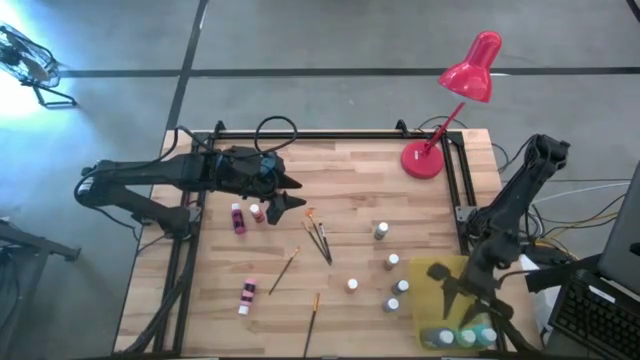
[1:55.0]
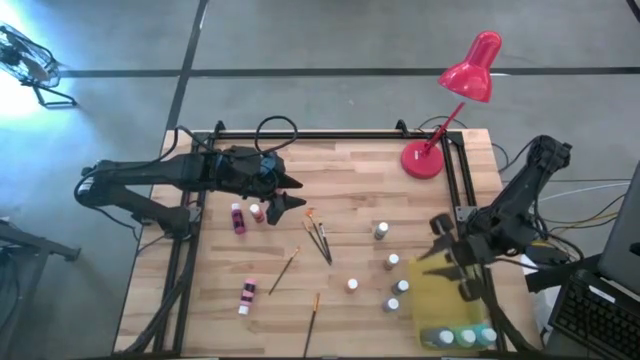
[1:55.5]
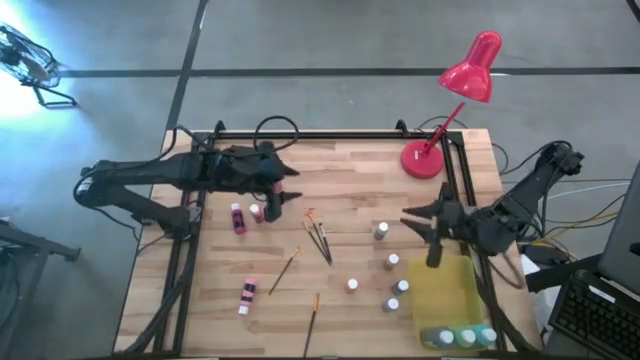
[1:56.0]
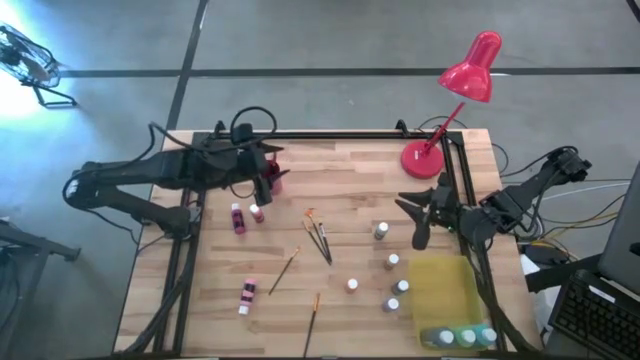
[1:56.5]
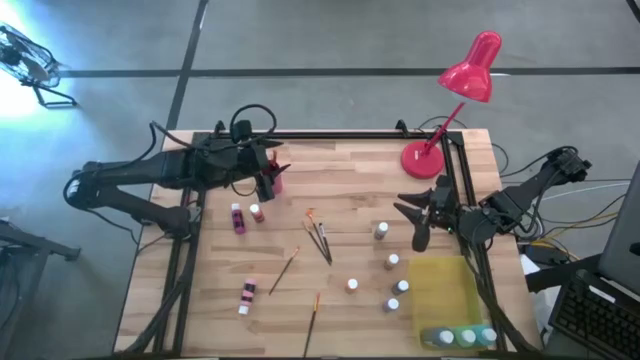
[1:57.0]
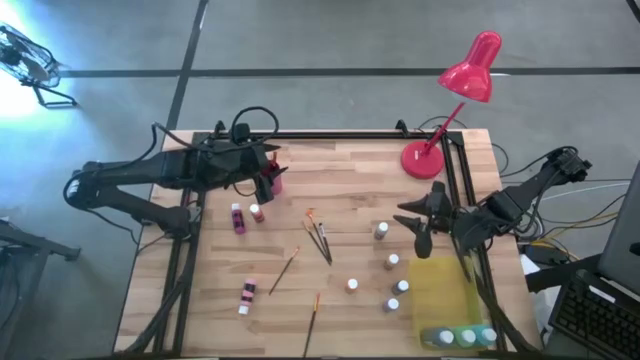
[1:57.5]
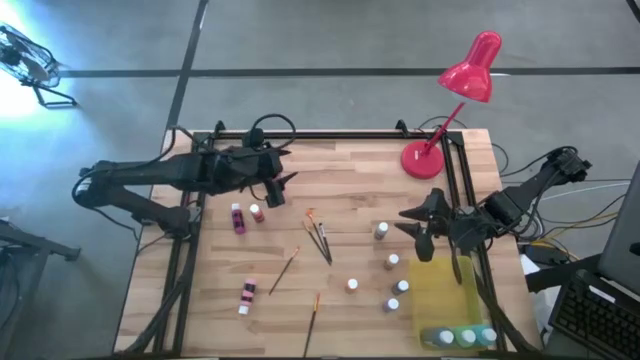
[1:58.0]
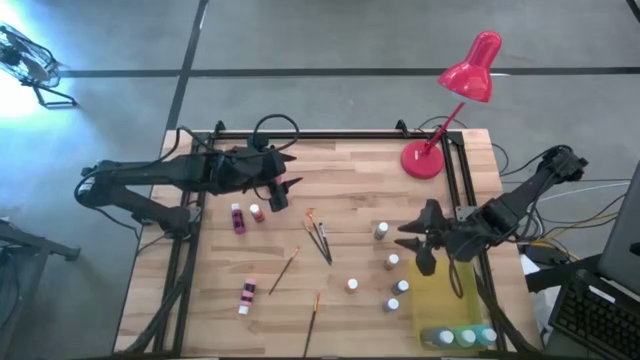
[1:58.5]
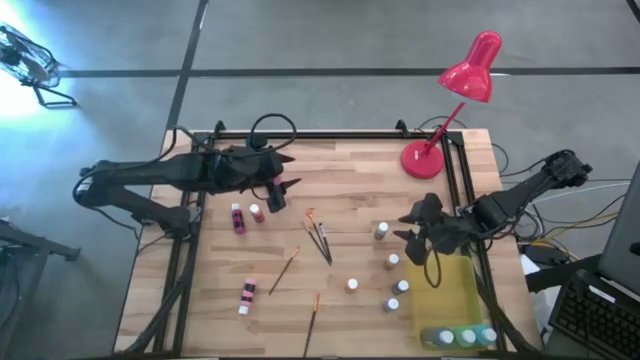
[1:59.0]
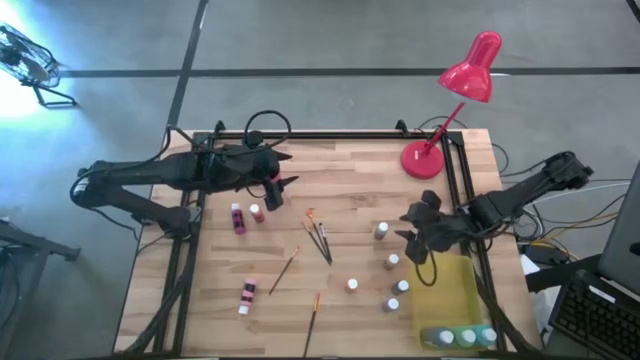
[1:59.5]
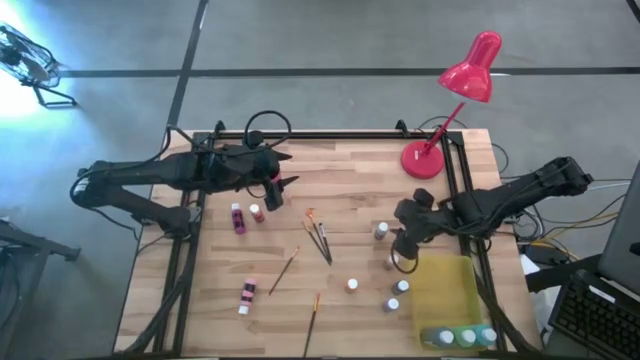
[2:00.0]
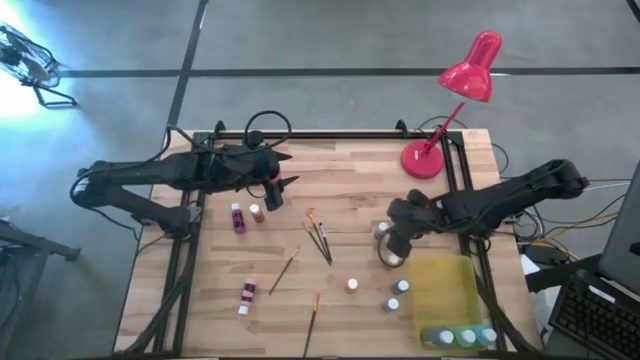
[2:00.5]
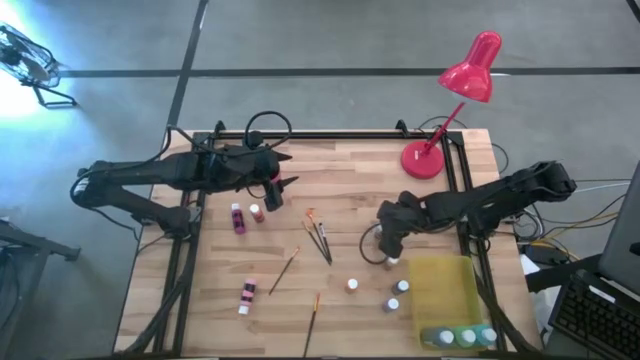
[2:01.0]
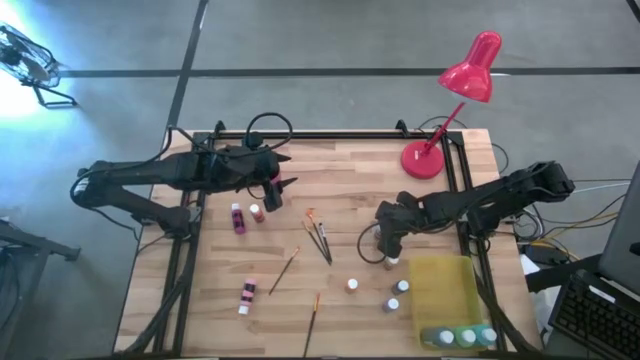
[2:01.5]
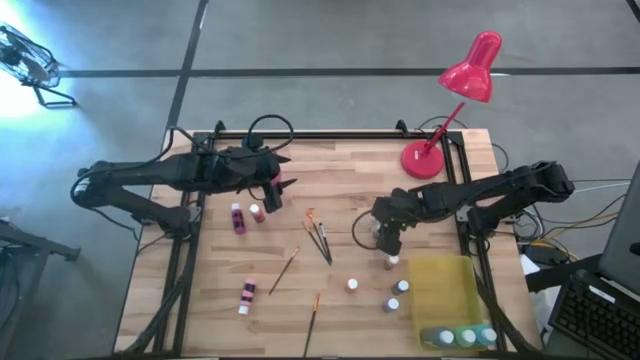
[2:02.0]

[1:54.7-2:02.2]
Task: Pick & Place Paint Supplies
Put the black paint bottle into the yellow bin

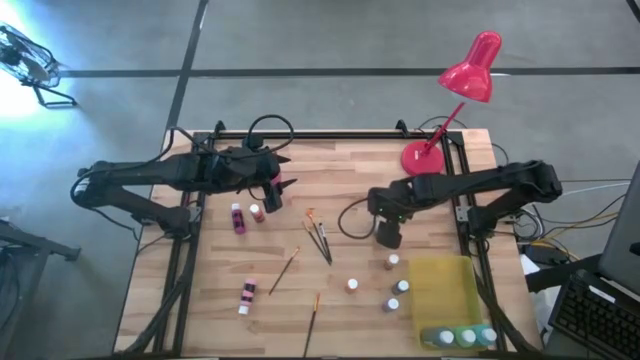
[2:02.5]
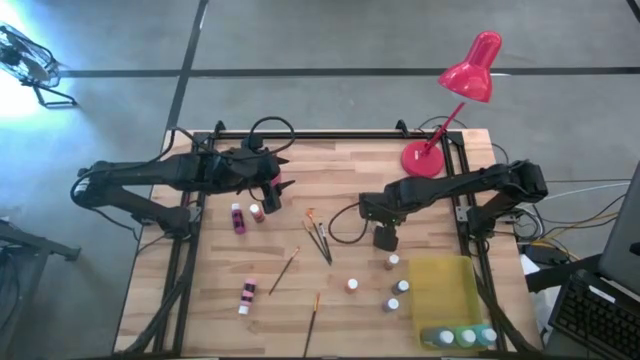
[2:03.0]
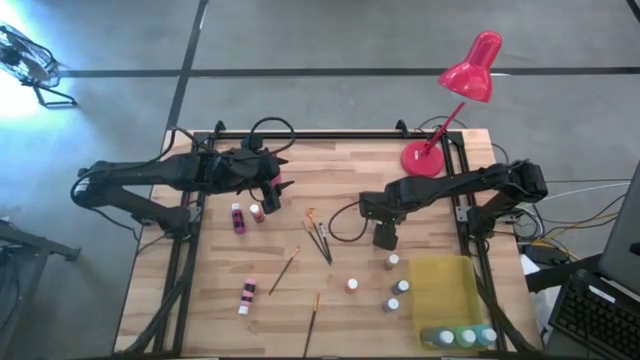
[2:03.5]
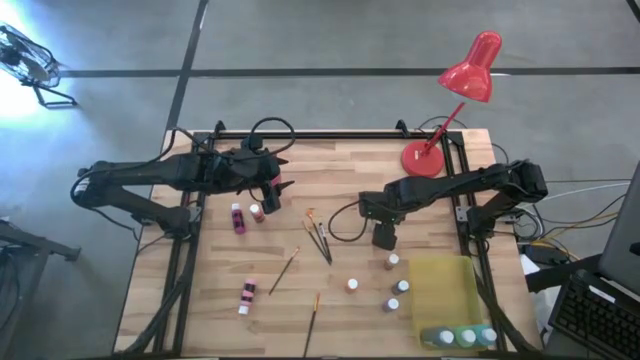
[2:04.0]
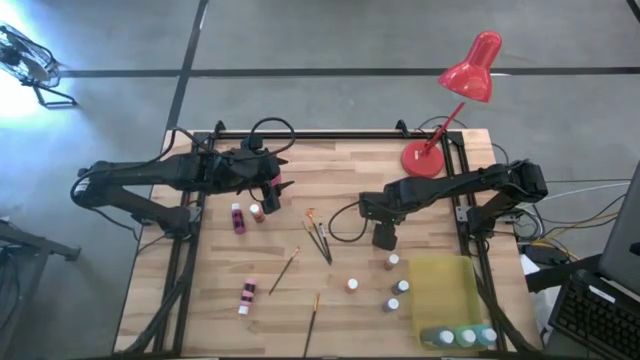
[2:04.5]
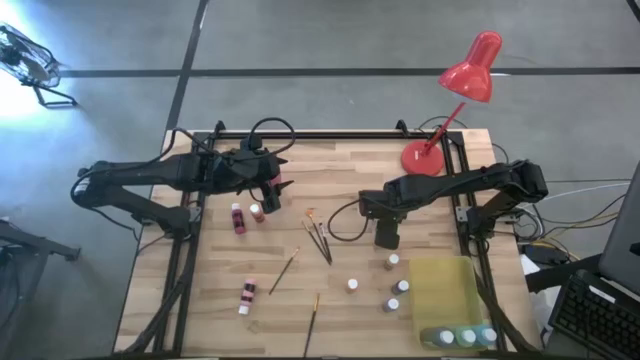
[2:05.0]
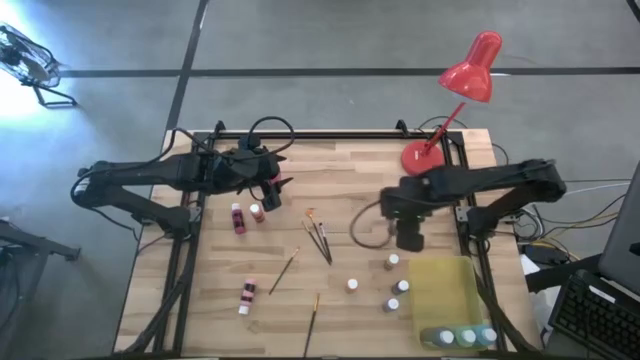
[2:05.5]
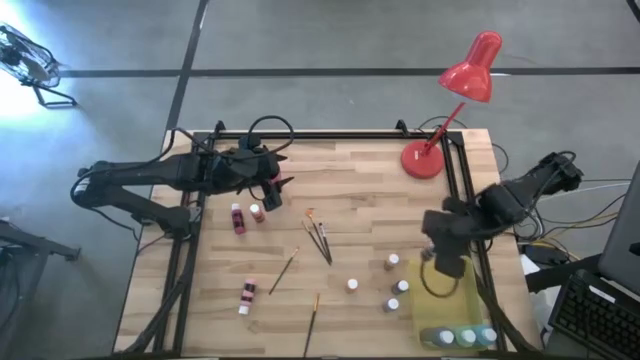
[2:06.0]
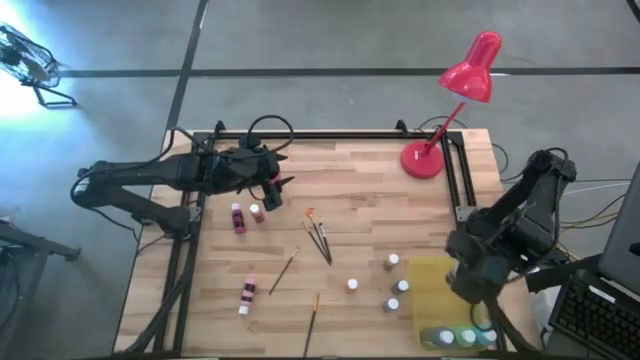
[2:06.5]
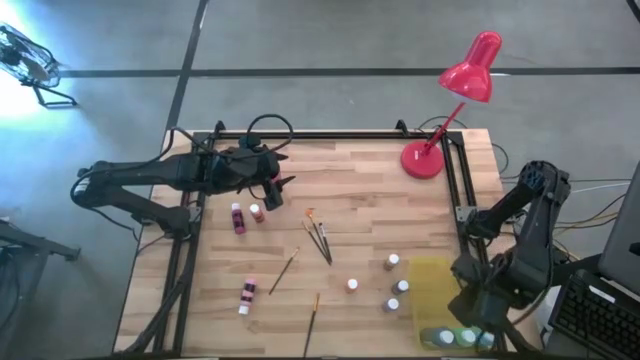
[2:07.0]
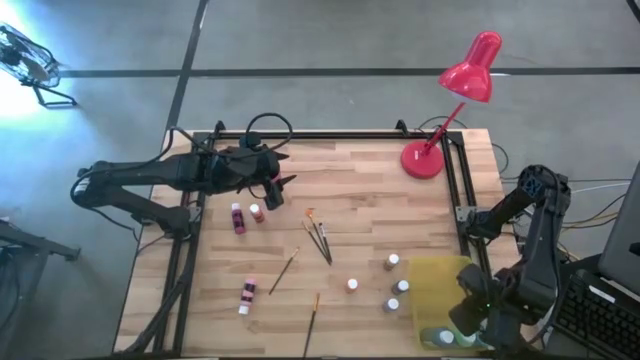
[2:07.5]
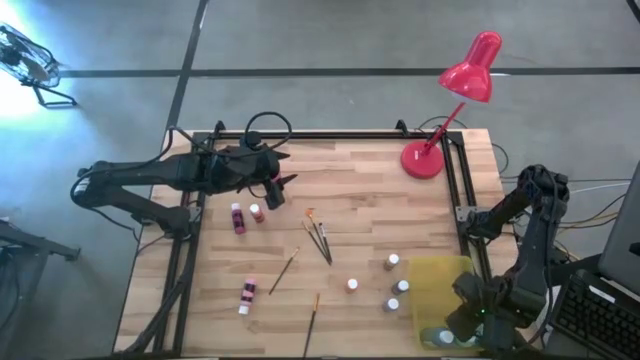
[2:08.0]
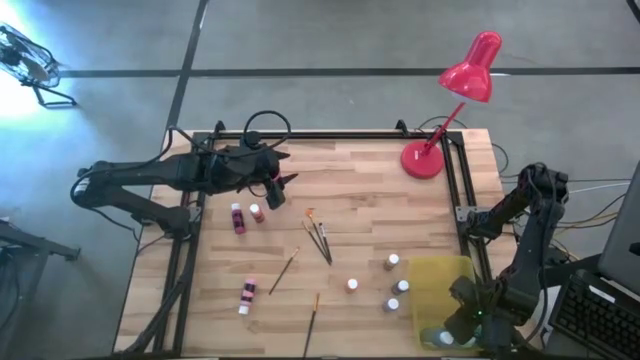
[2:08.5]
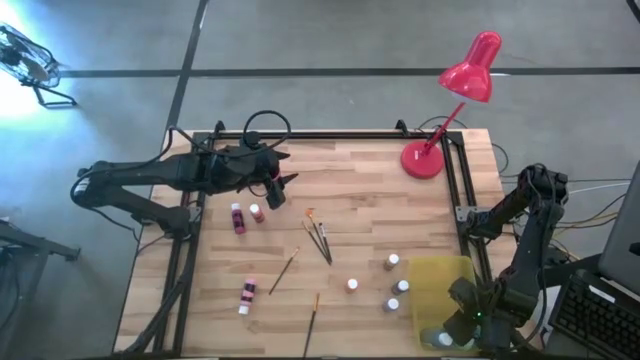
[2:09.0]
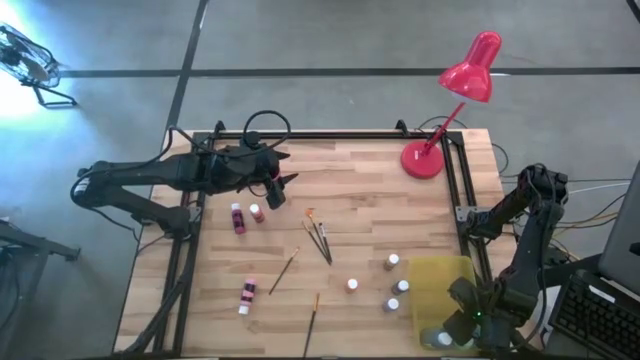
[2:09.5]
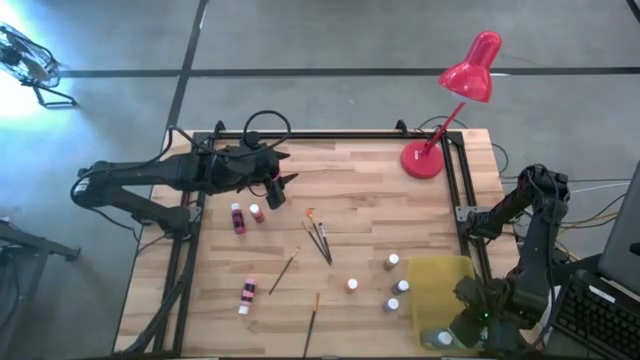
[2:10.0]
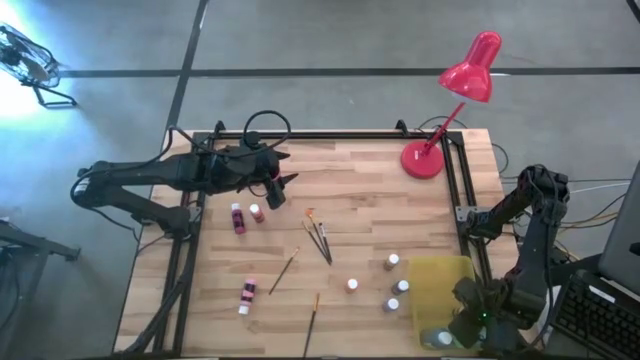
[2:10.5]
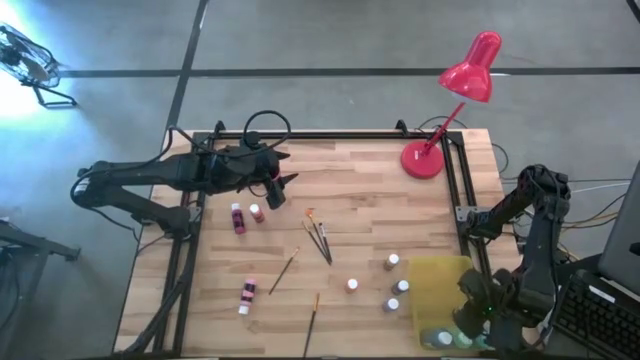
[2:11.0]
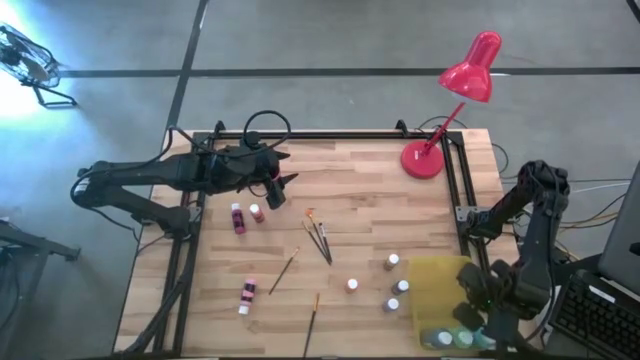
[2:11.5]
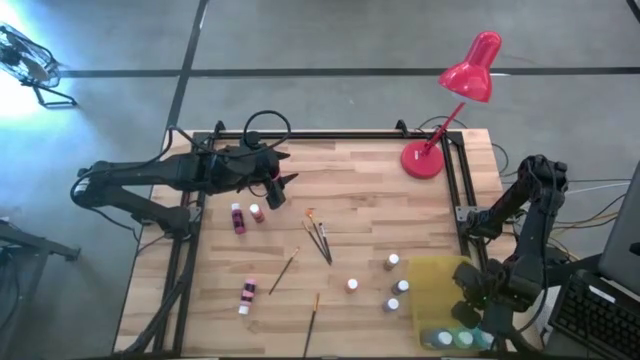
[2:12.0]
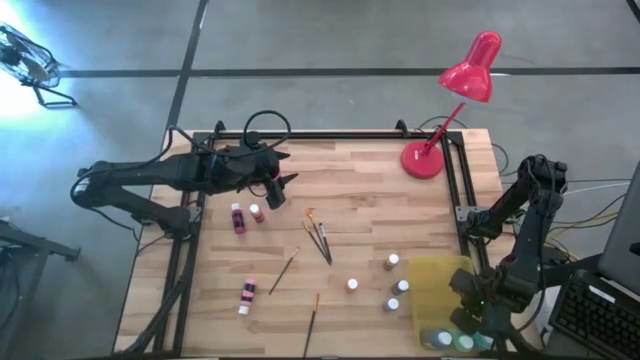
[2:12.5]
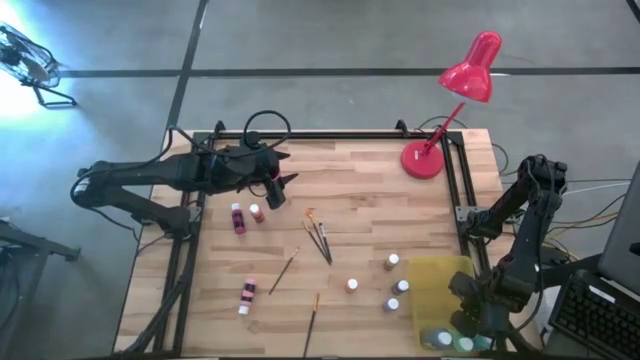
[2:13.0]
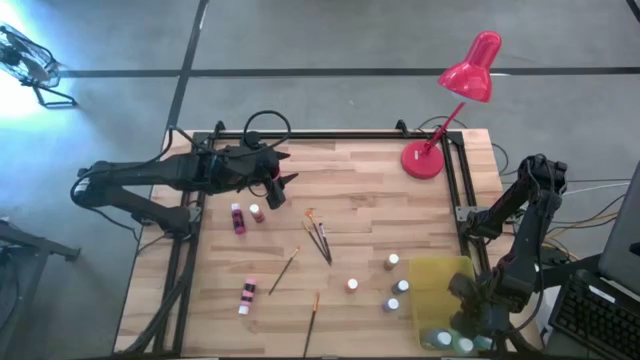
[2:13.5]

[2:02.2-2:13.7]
Put the black paint bottle into the yellow bin
